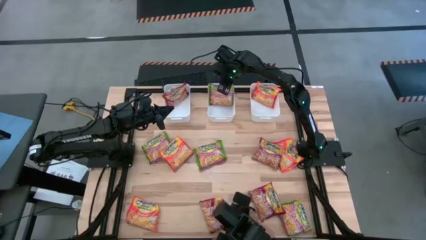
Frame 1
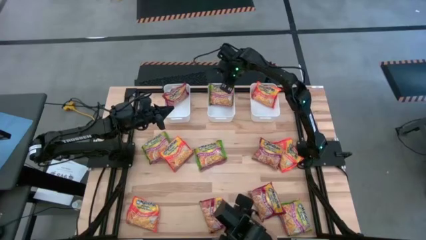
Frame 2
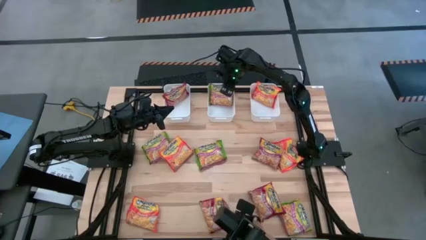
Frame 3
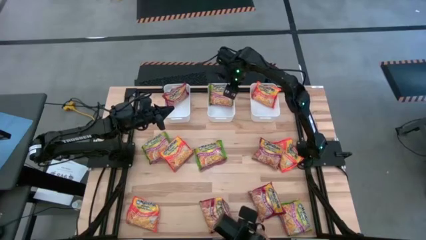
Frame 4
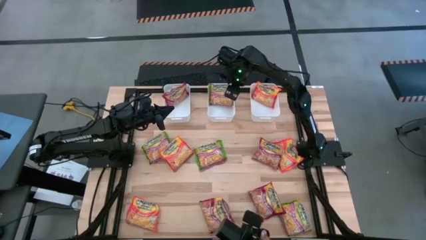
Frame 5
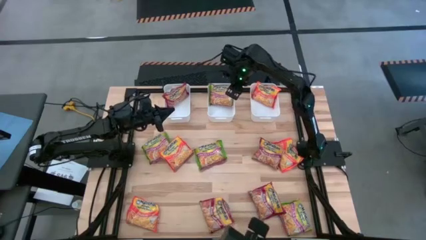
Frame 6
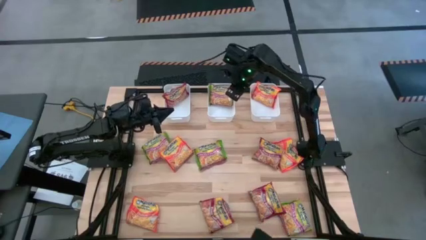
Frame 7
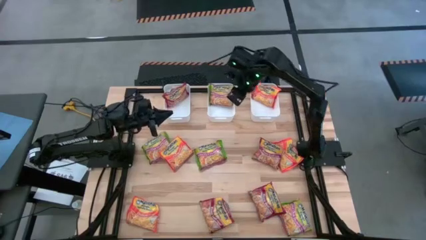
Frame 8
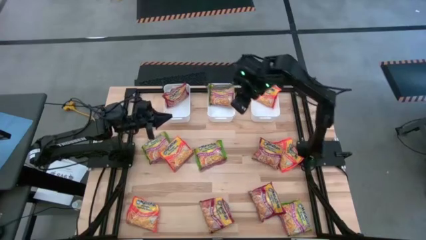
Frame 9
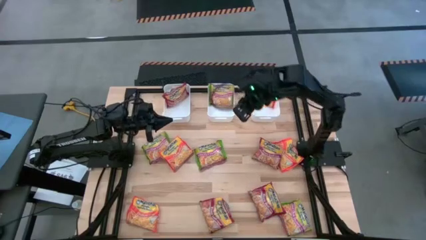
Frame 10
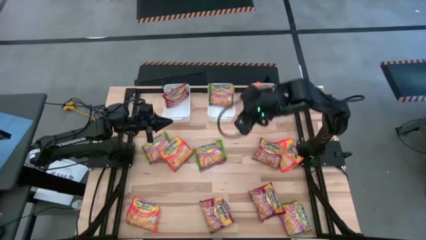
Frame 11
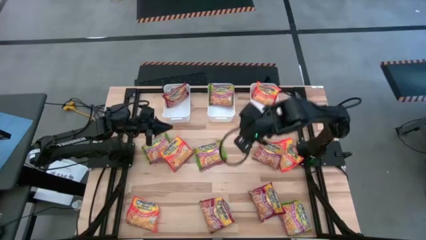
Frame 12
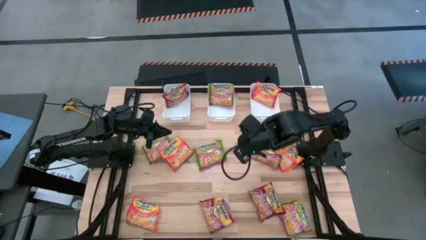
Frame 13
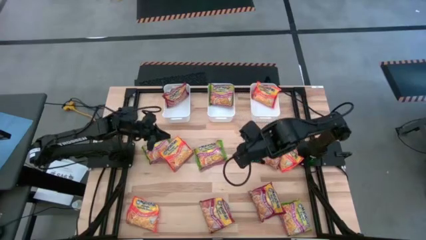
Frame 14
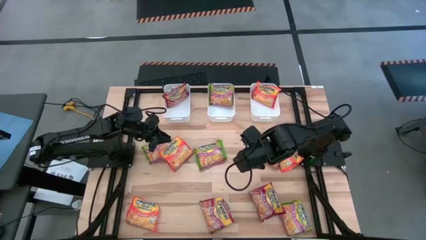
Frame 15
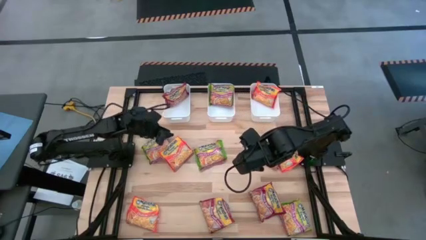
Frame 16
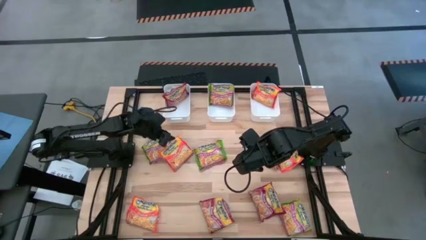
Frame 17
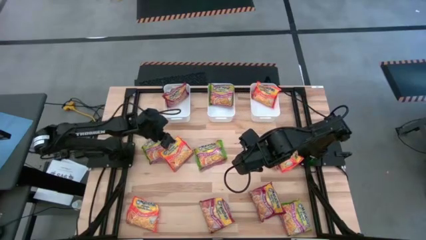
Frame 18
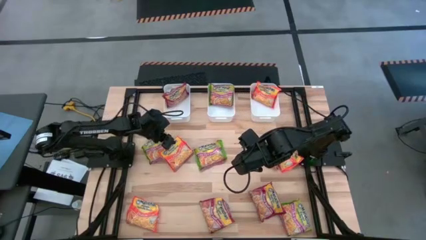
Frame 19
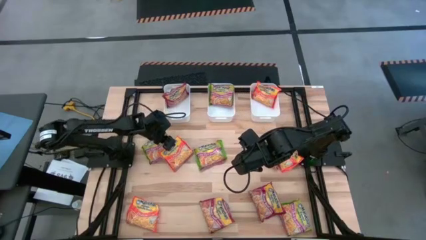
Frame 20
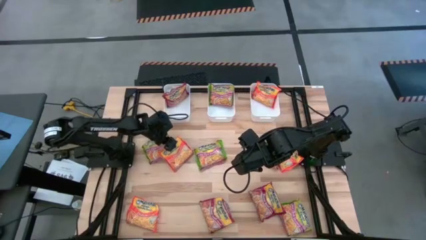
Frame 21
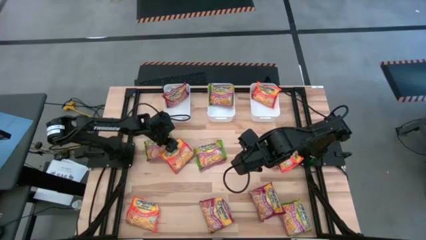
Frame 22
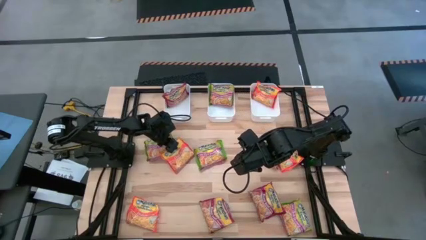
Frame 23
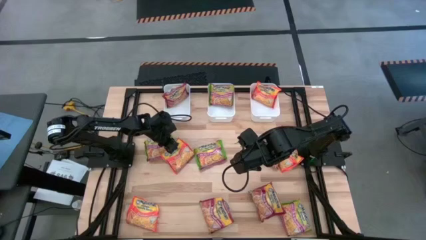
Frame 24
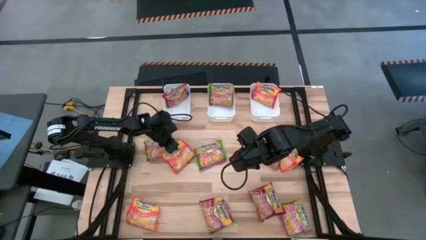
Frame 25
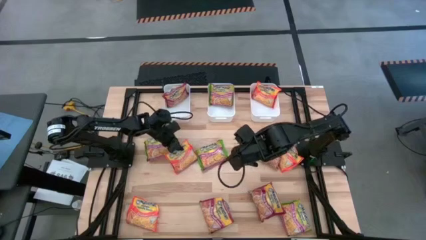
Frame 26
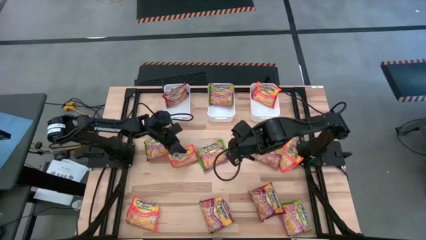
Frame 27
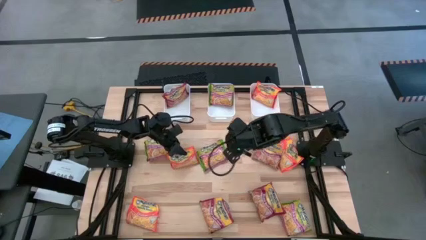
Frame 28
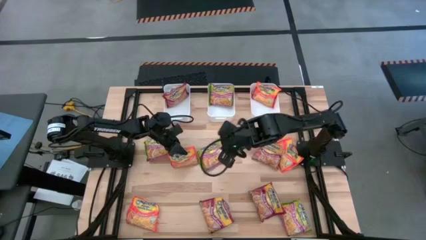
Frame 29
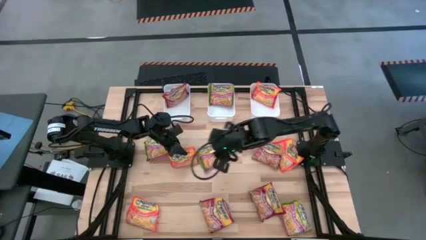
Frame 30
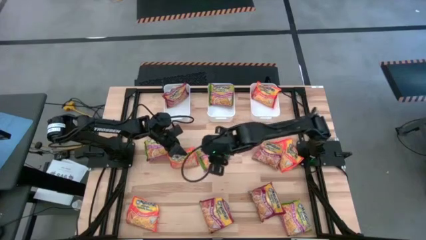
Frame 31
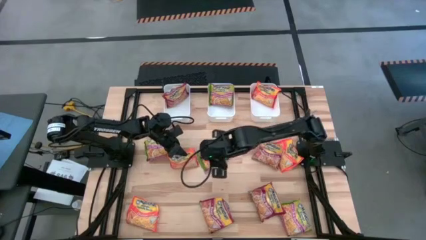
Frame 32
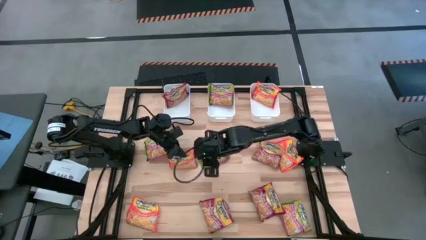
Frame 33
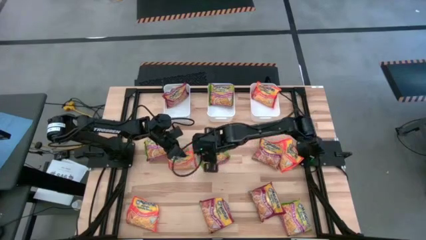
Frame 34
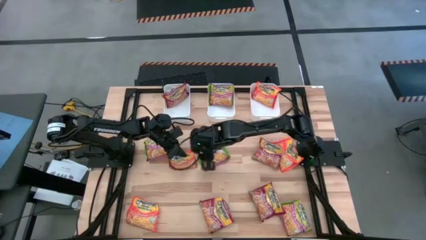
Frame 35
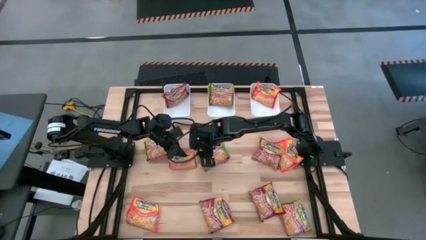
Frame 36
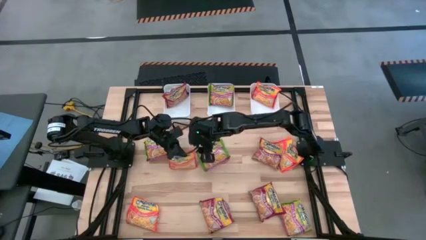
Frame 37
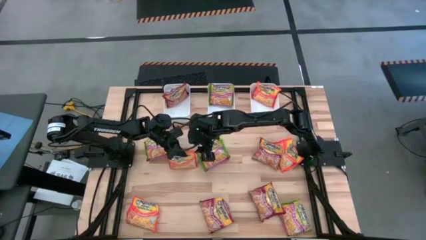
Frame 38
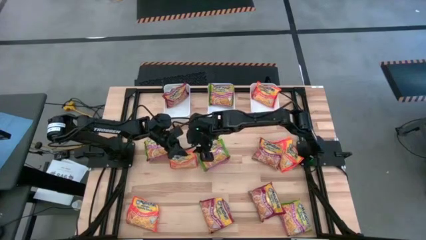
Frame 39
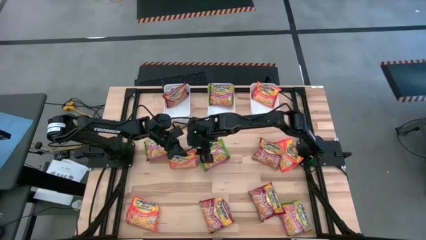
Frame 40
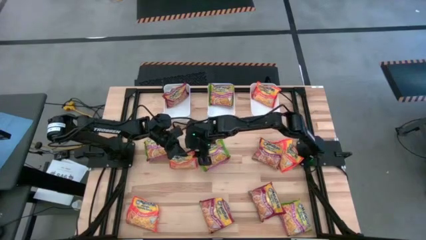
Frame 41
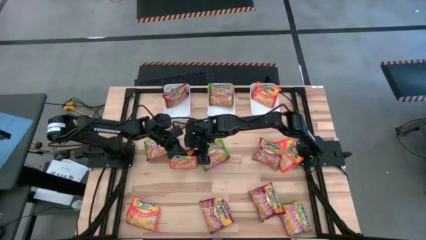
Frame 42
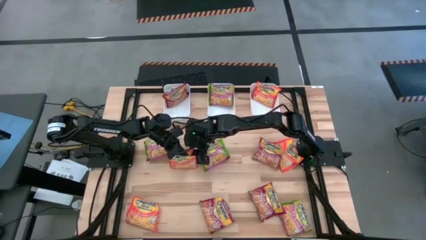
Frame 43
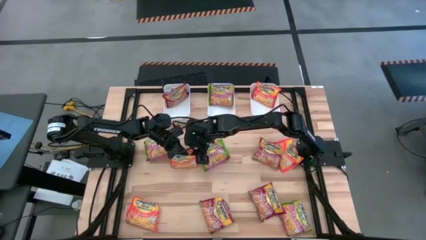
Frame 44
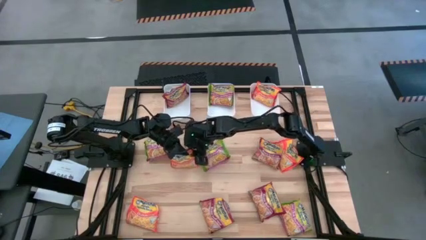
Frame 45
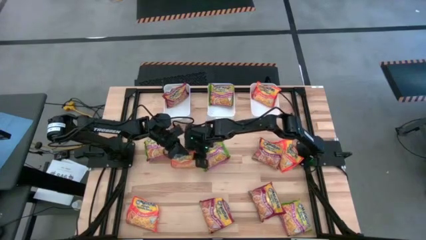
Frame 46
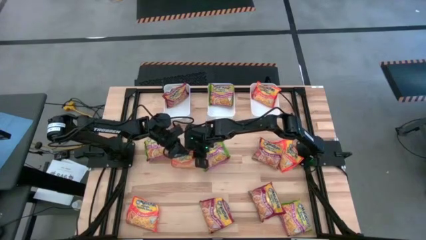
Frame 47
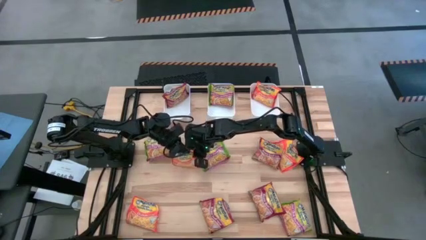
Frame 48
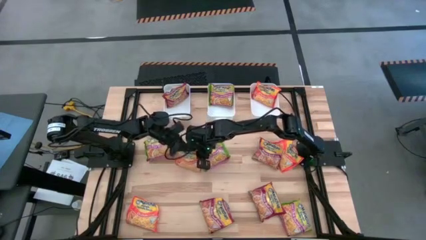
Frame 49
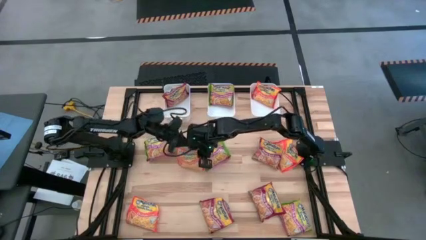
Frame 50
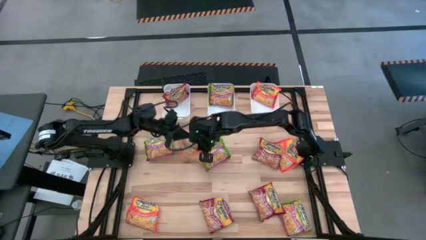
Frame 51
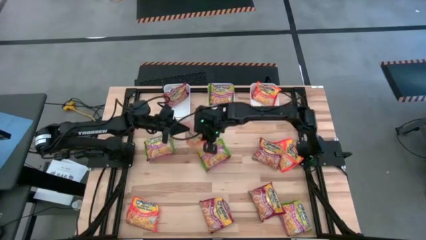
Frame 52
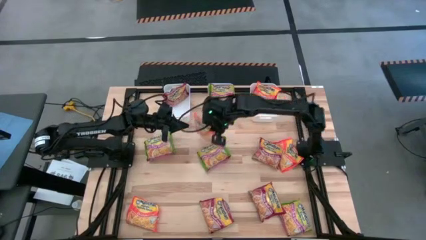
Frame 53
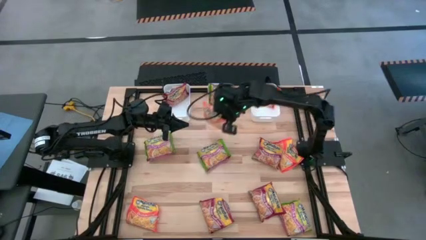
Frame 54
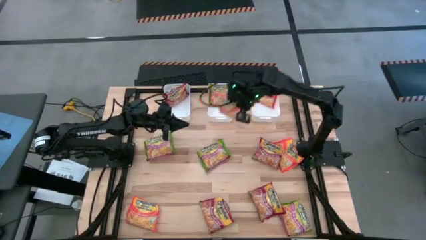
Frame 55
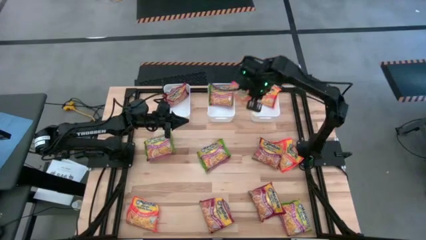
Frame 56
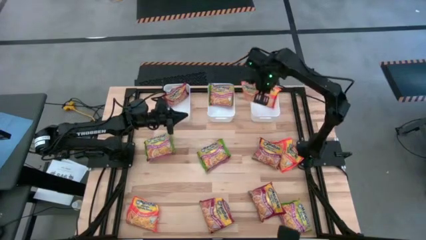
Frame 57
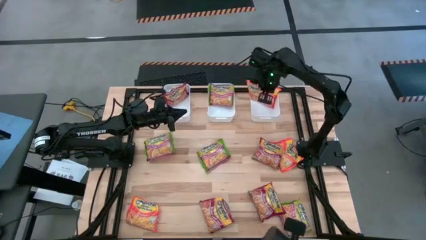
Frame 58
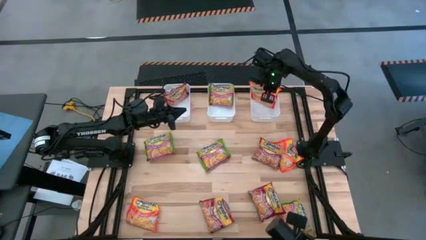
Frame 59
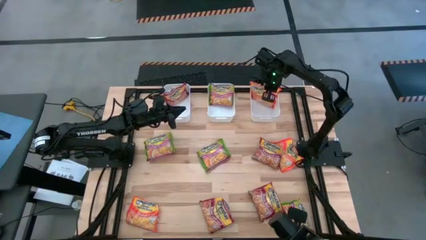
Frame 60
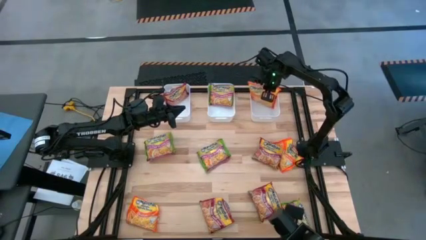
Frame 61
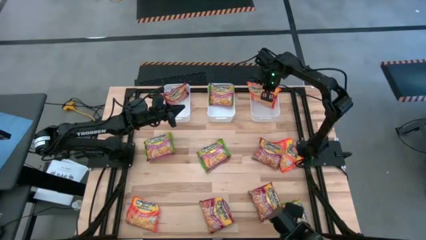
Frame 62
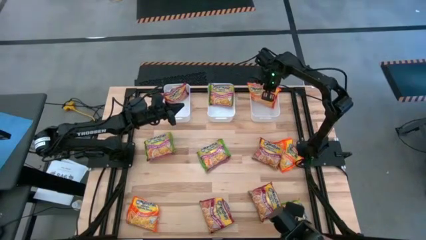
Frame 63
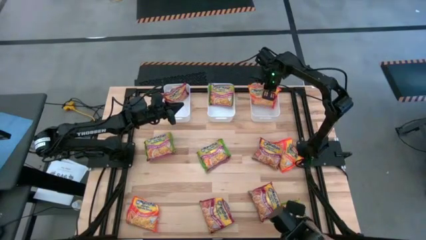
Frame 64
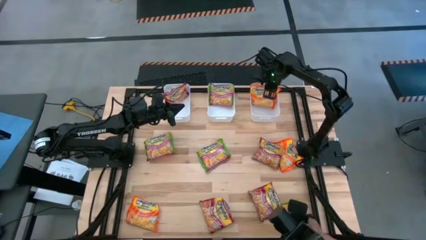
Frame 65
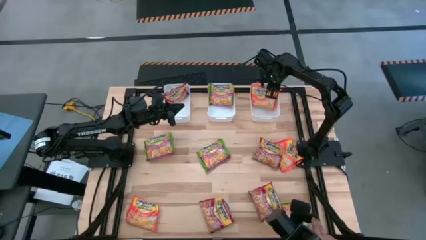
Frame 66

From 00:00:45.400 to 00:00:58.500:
Task: Sort Maruchan noodles
Put the orange noodle pack into the right white bin

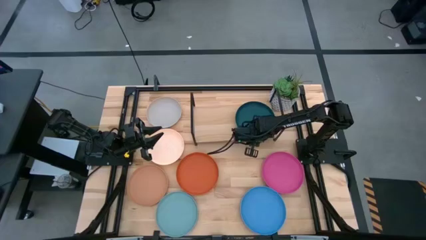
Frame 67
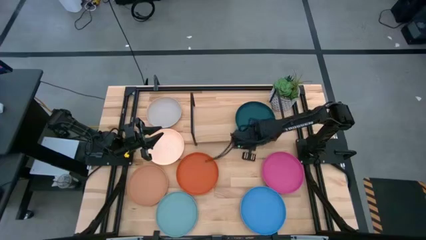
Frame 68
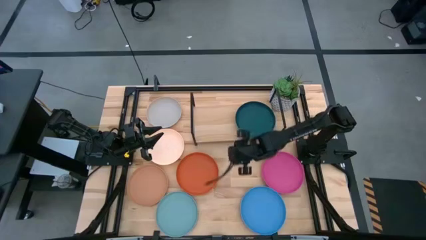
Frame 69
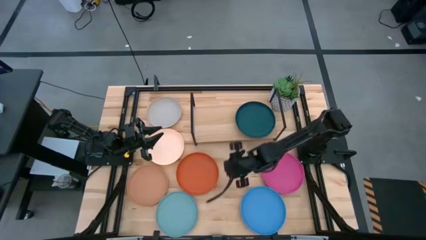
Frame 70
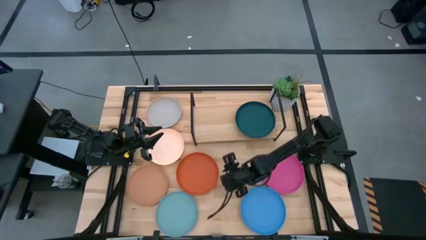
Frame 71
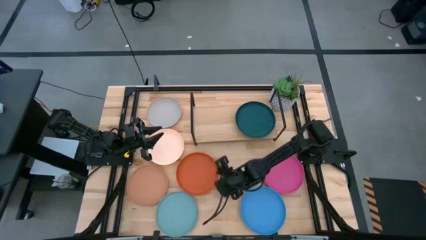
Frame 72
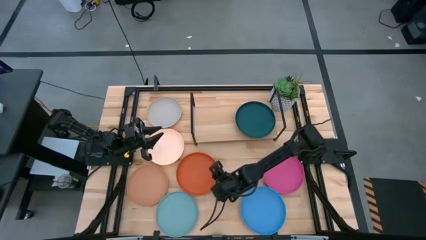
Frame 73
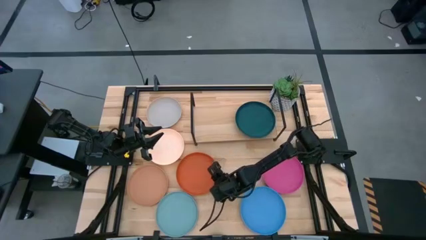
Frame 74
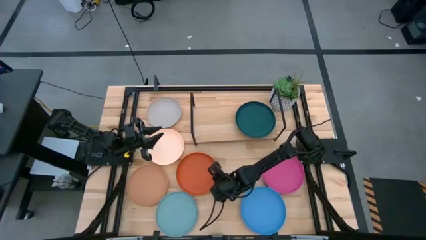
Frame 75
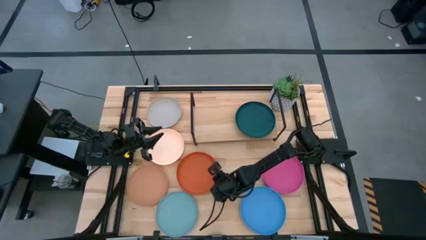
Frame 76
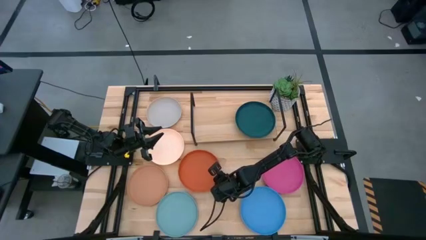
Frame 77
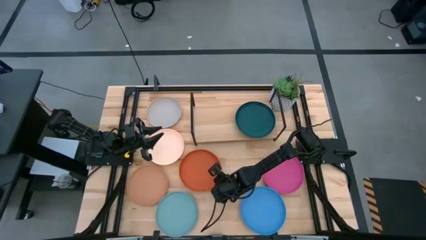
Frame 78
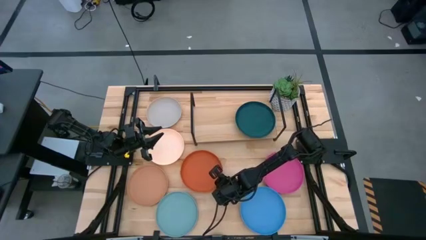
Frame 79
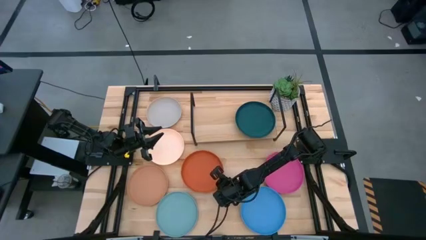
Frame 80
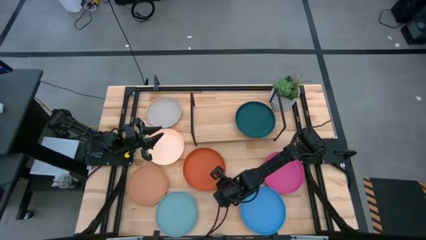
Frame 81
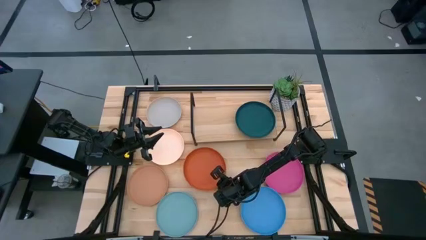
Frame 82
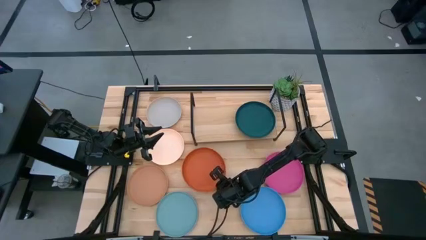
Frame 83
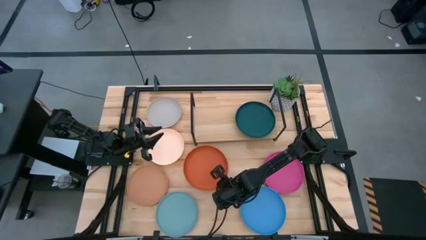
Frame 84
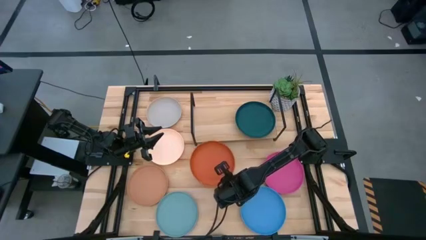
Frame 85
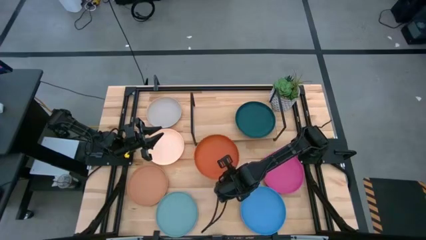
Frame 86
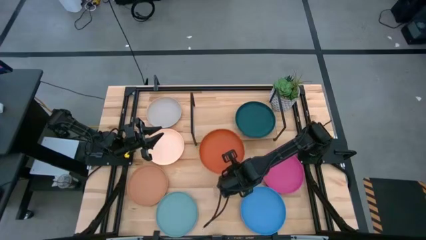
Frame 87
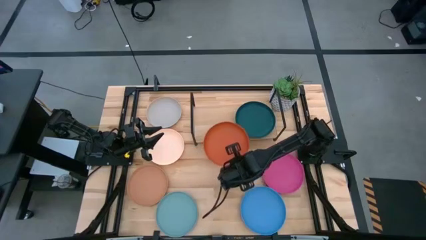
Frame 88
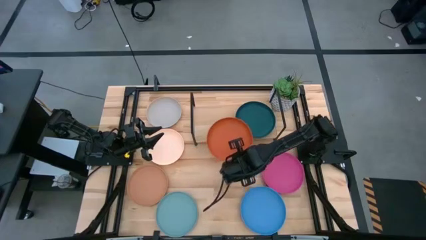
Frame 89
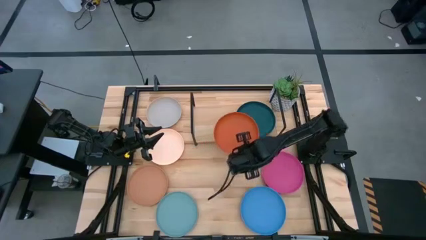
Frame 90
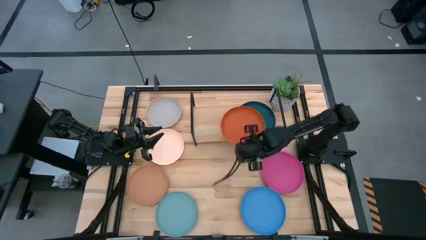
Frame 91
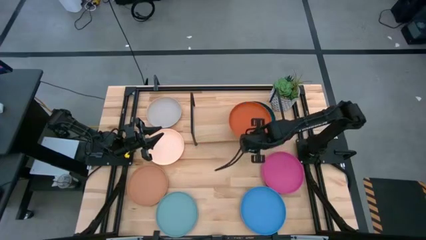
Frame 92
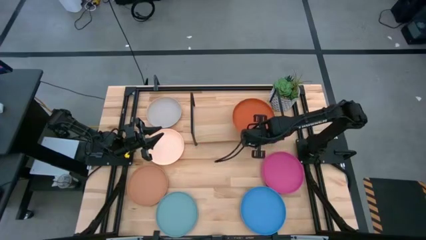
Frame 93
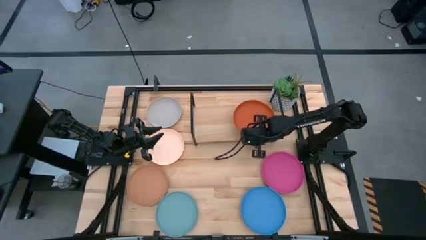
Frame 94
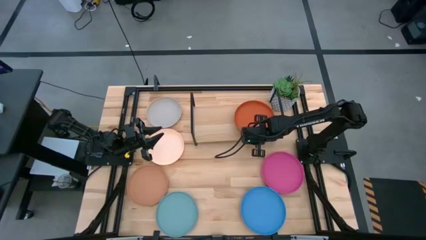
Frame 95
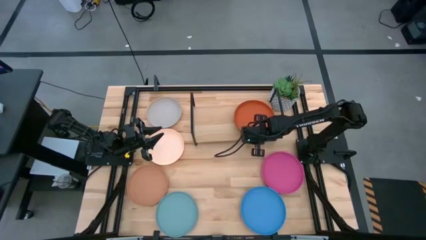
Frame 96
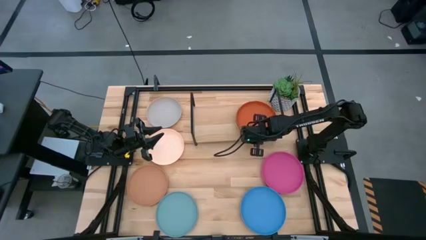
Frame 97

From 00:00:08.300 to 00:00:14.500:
Task: Place and stack plates onto a shelf
Stack the orange plate on top of the dark green plate on the shelf
